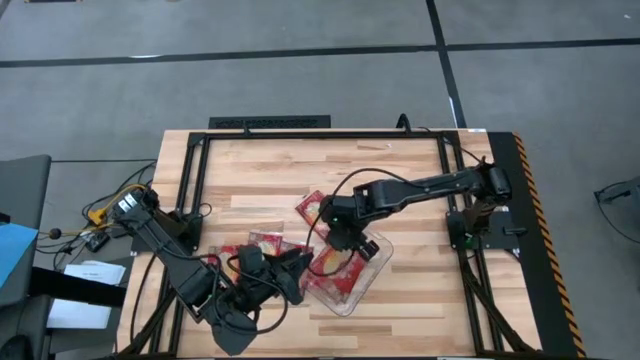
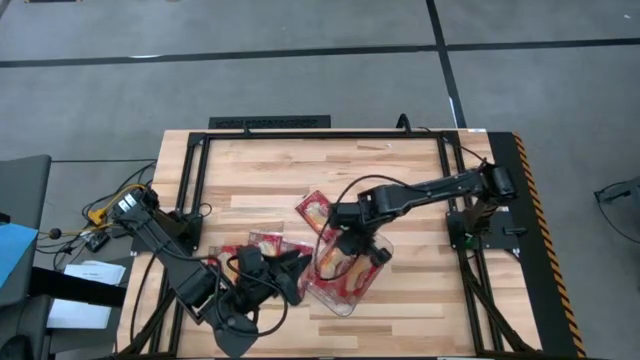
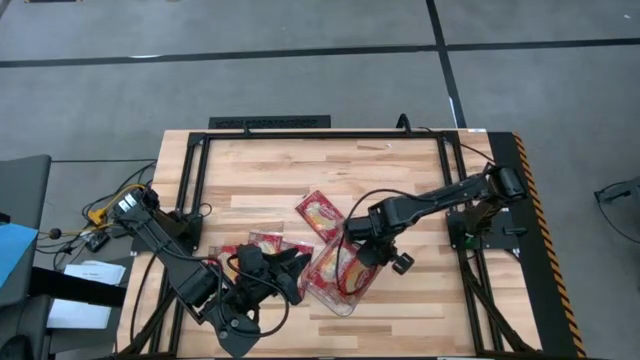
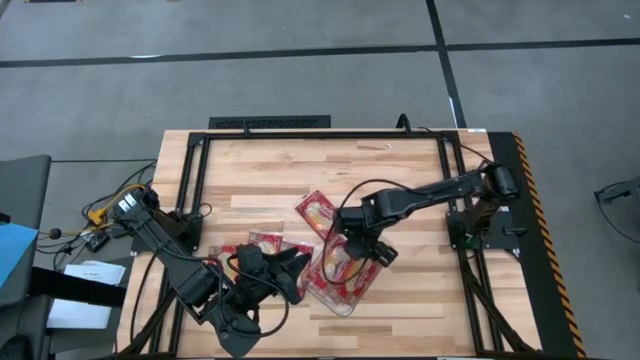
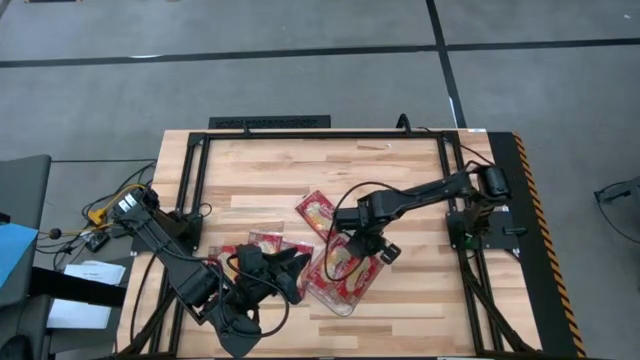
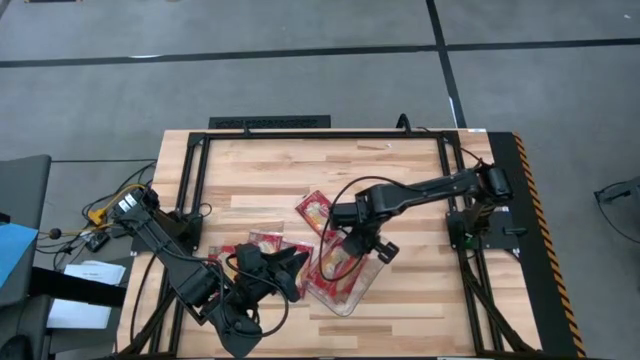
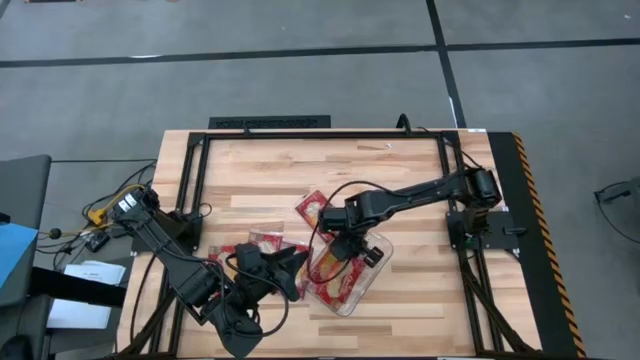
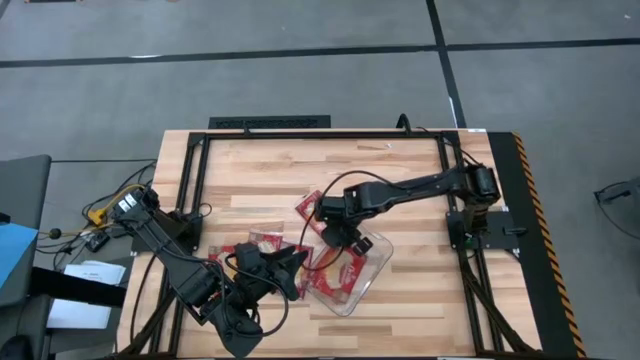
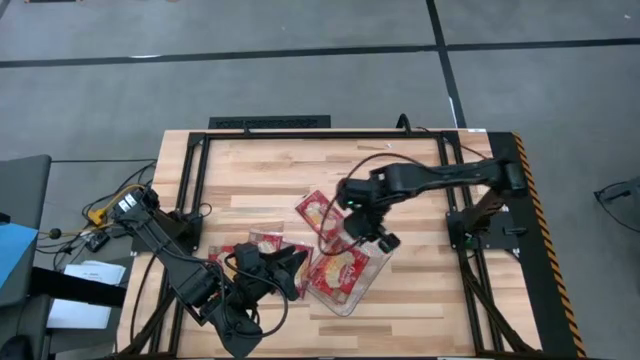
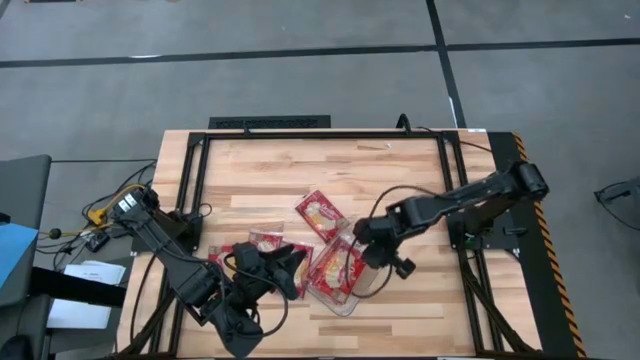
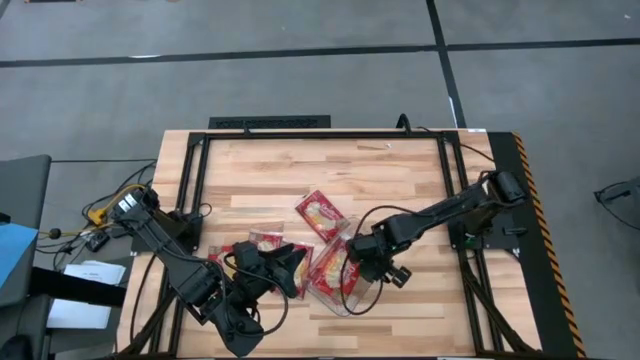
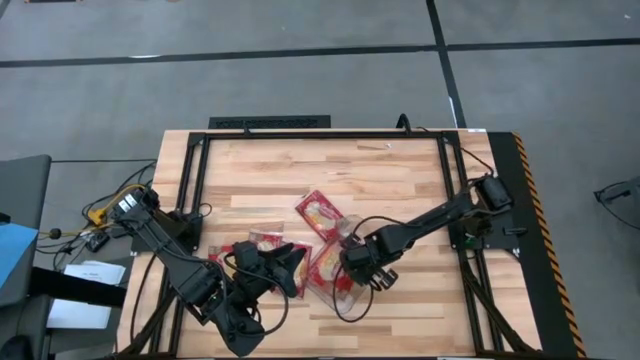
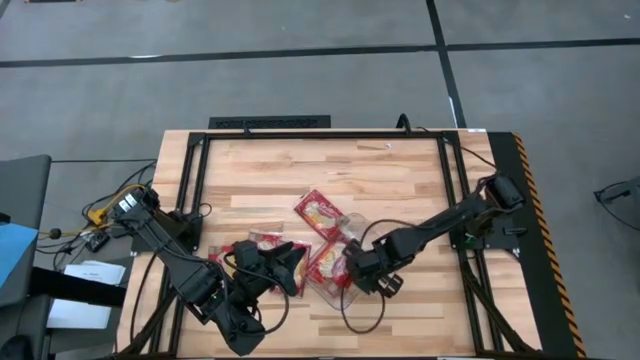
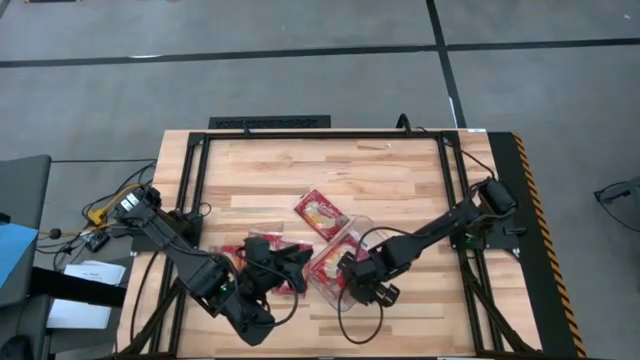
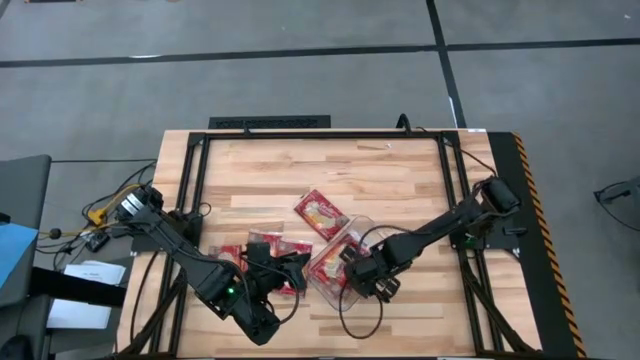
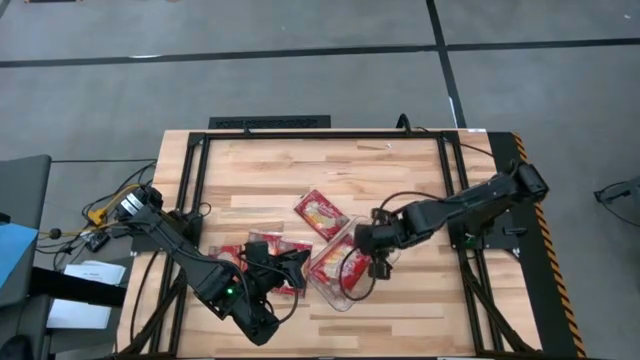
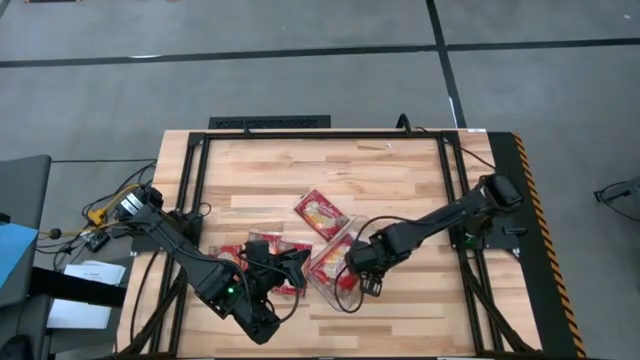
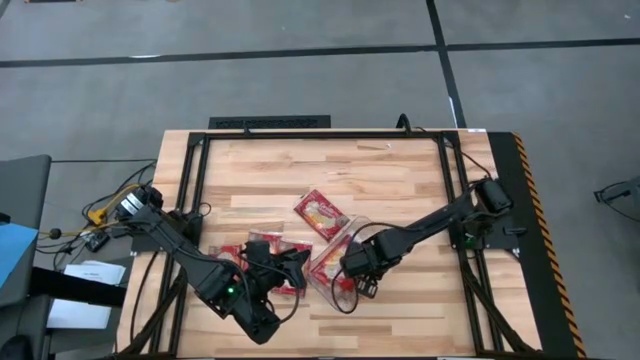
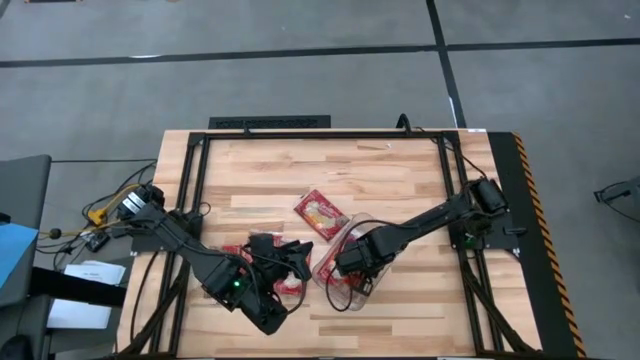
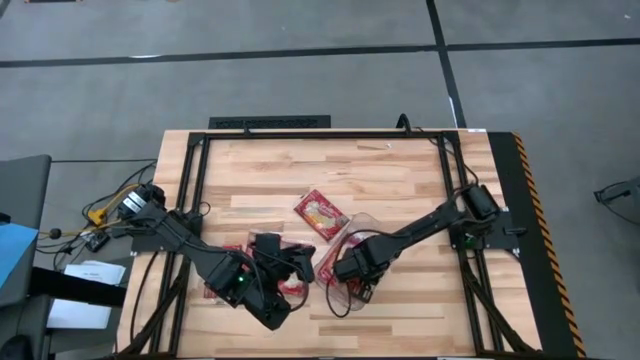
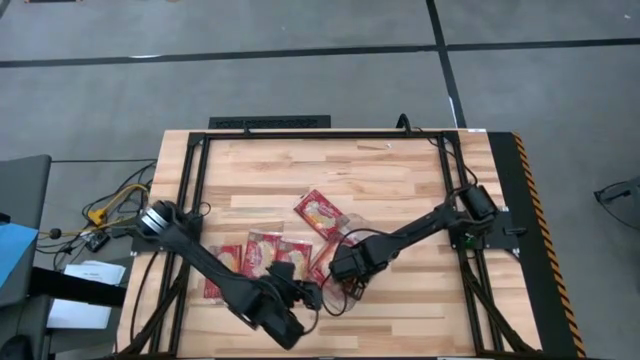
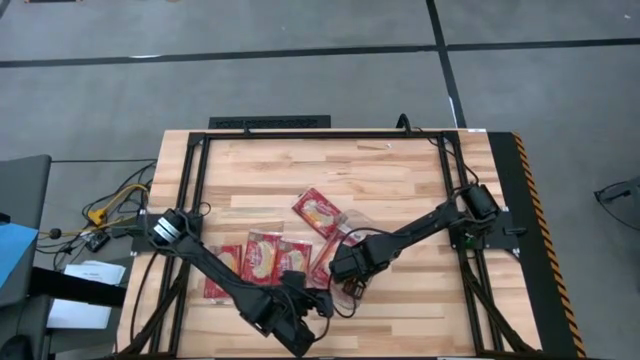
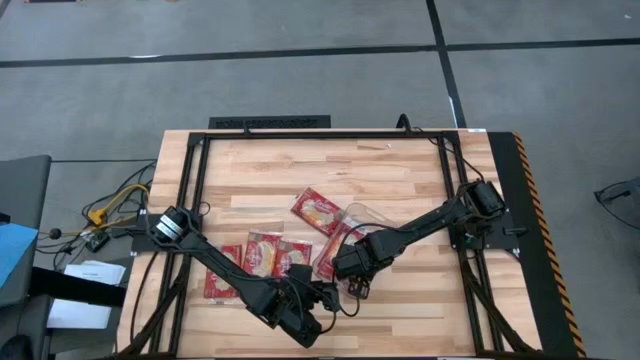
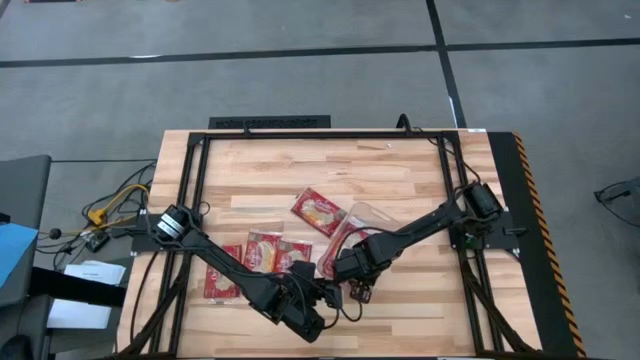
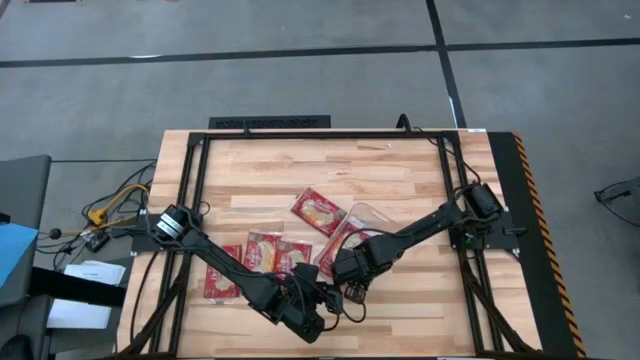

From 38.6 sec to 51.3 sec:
Task: Sort popcorn bags into baskets
Put the red popcorn packet into the transparent bin

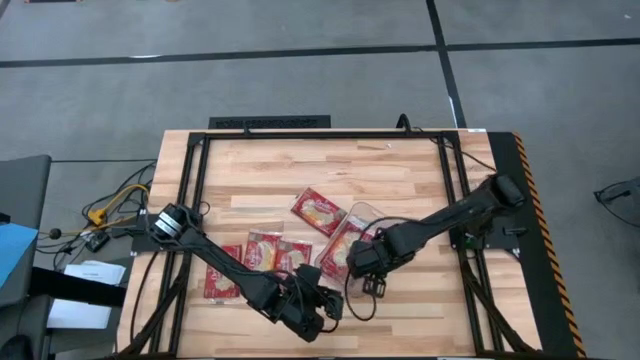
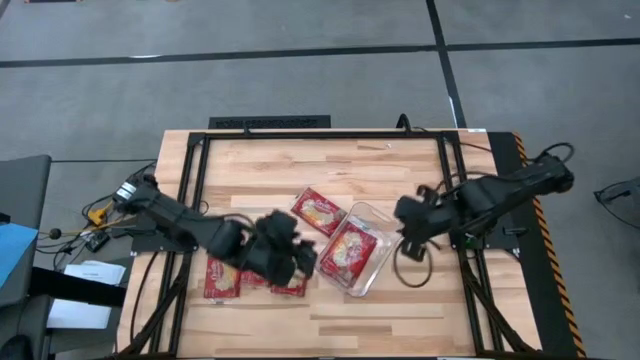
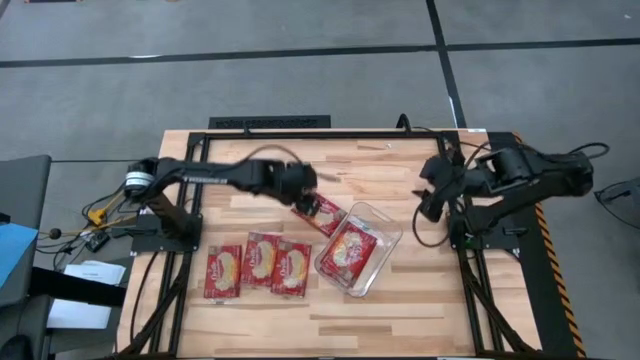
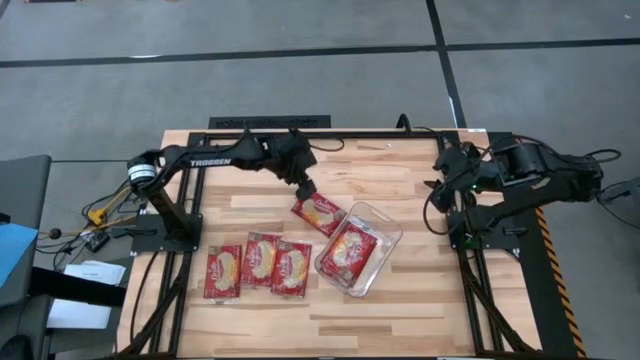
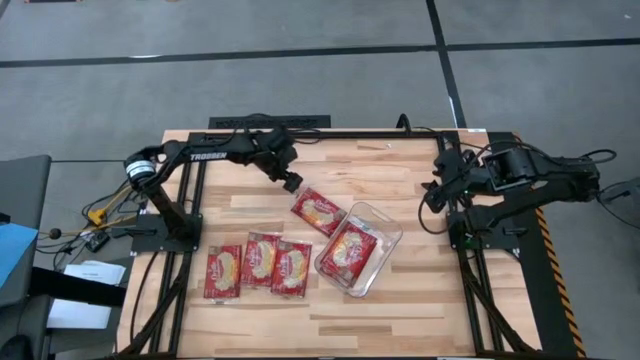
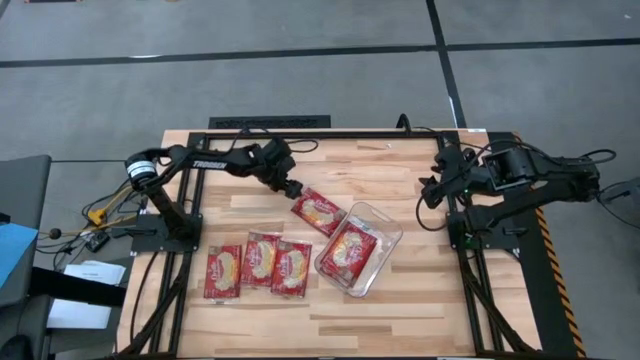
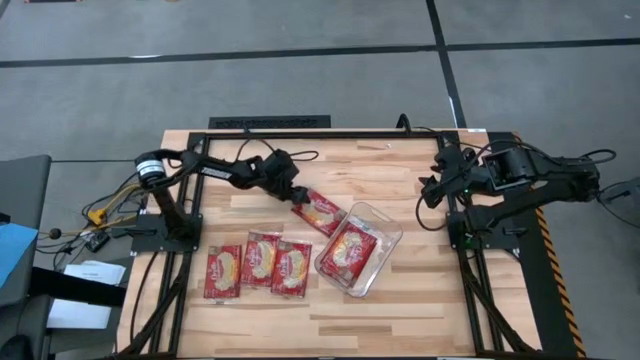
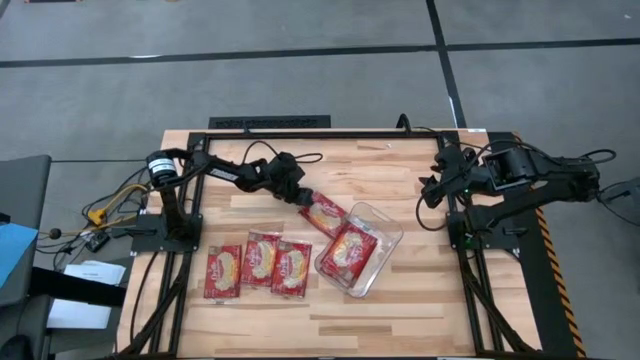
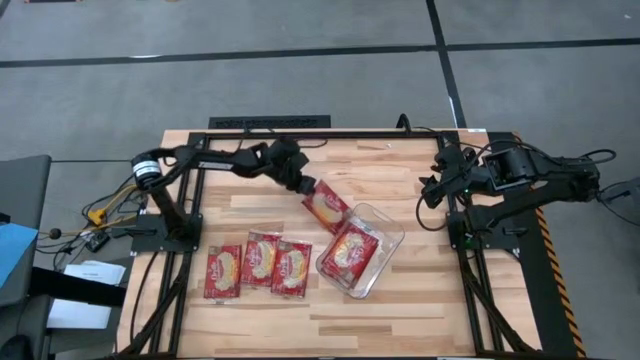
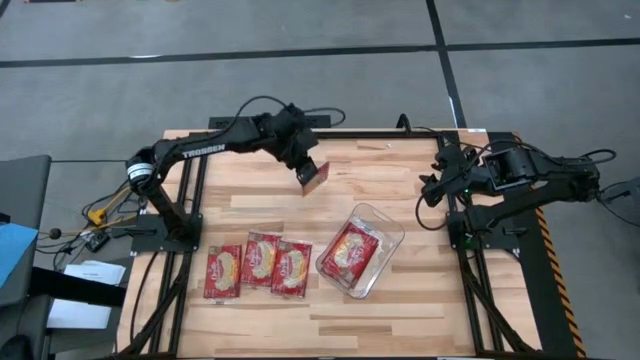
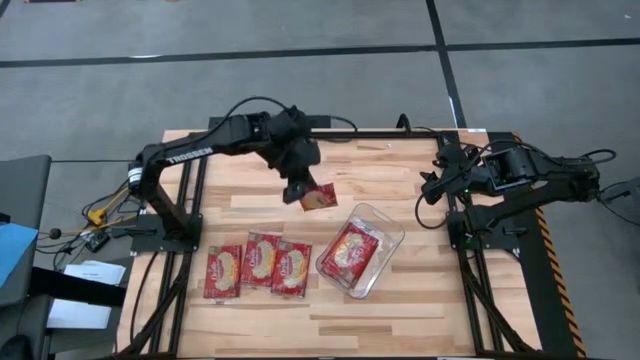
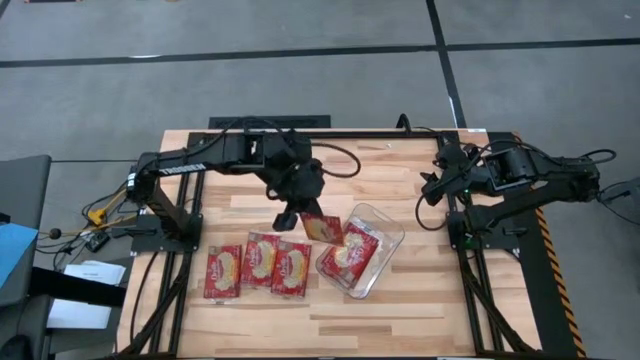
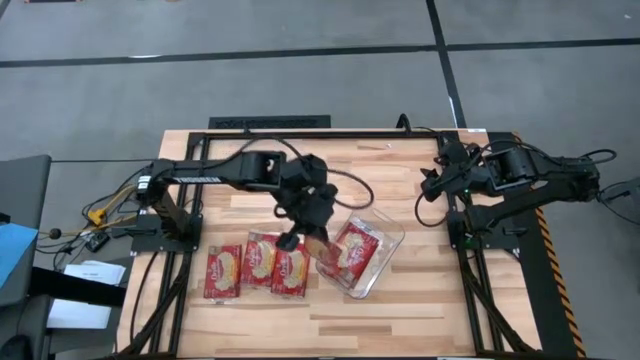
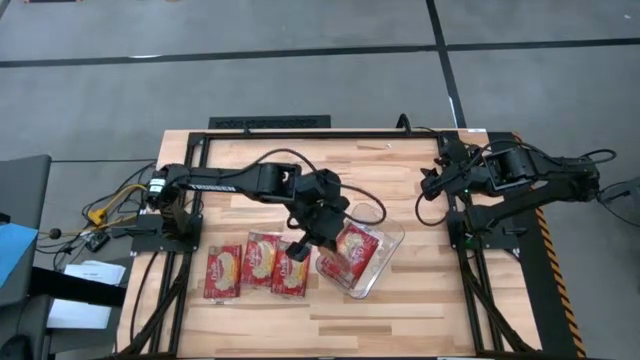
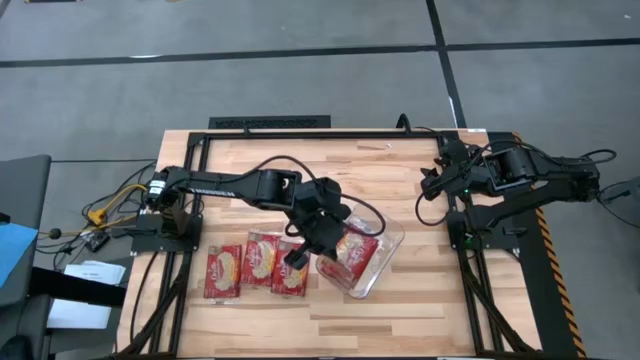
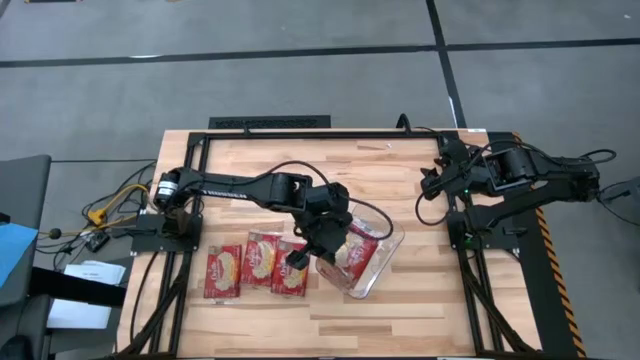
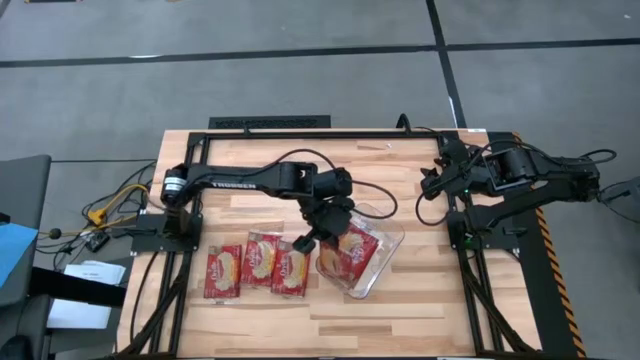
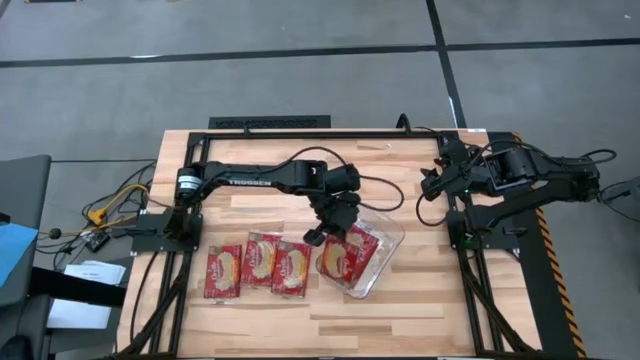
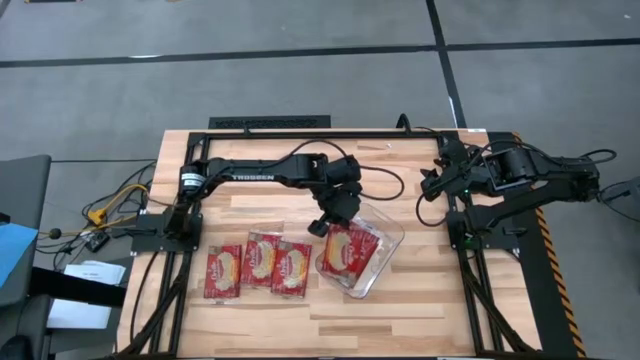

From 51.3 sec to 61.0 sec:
Put the red popcorn packet into the transparent bin
